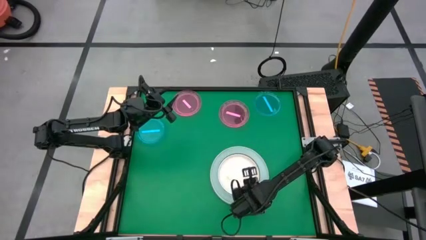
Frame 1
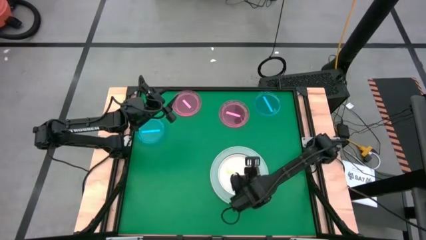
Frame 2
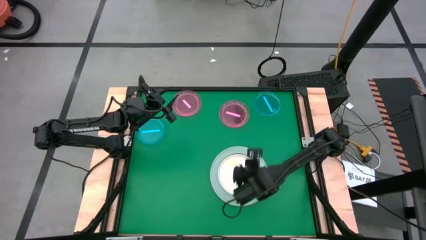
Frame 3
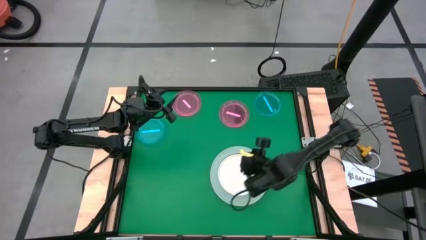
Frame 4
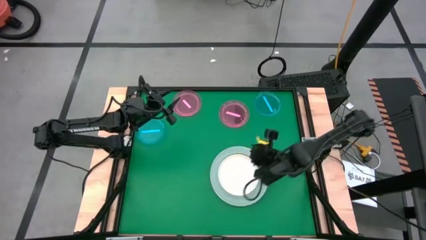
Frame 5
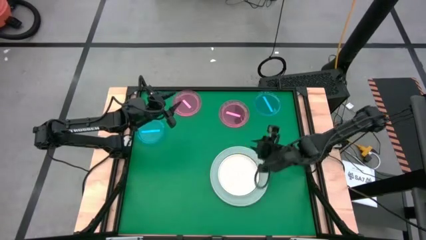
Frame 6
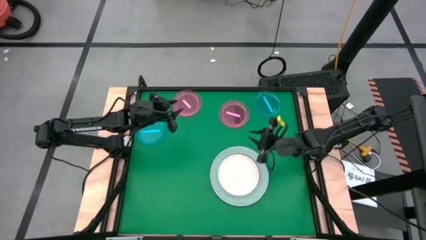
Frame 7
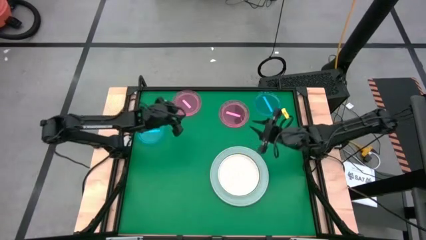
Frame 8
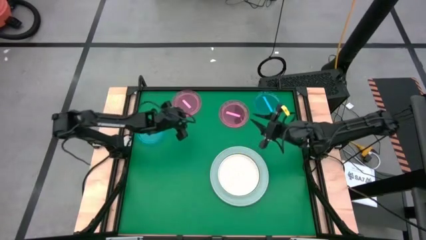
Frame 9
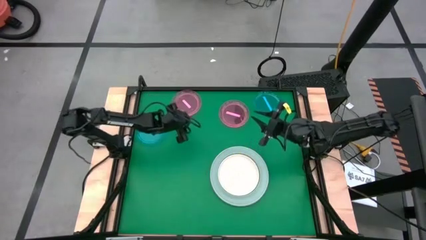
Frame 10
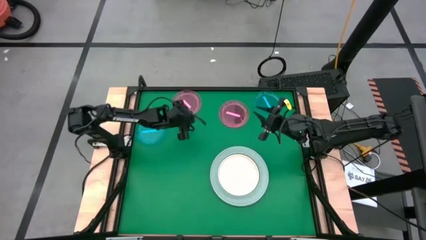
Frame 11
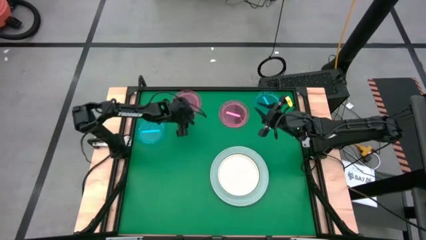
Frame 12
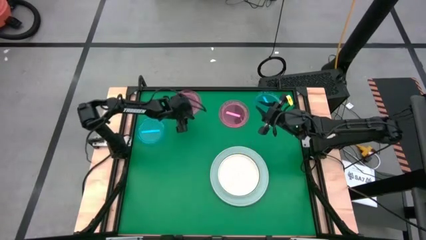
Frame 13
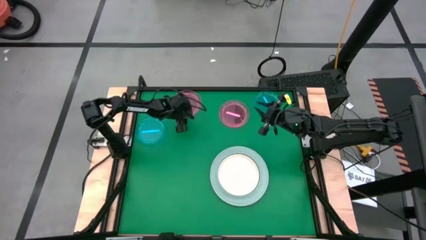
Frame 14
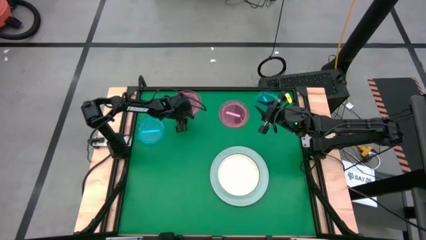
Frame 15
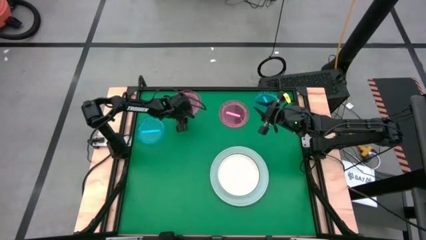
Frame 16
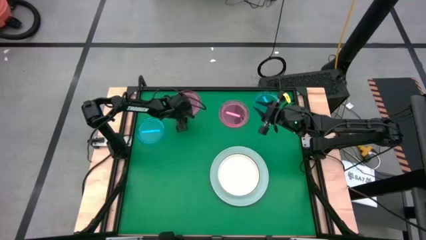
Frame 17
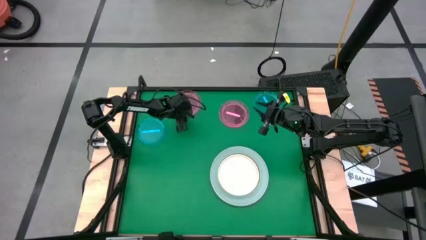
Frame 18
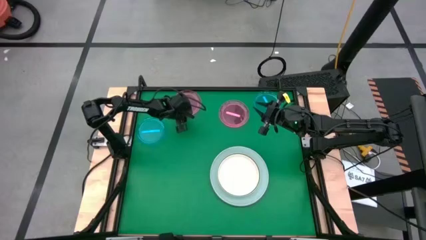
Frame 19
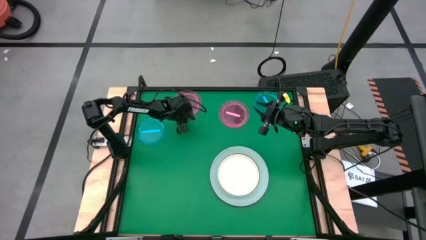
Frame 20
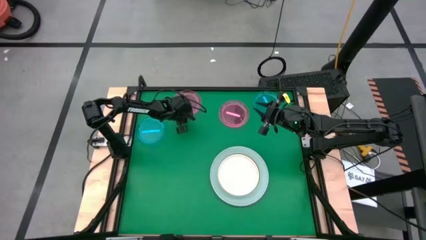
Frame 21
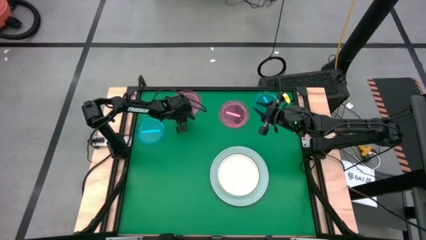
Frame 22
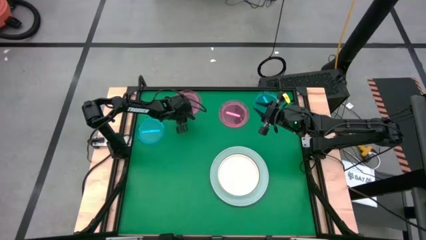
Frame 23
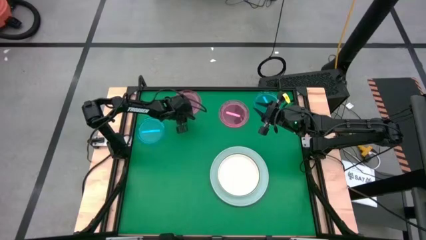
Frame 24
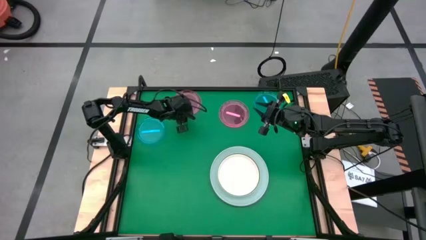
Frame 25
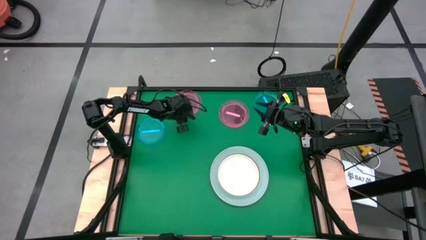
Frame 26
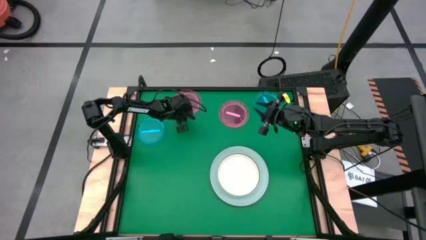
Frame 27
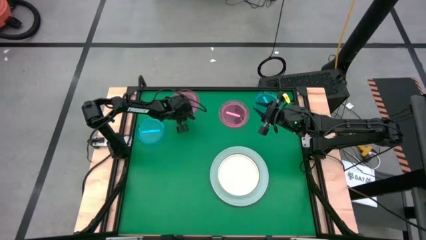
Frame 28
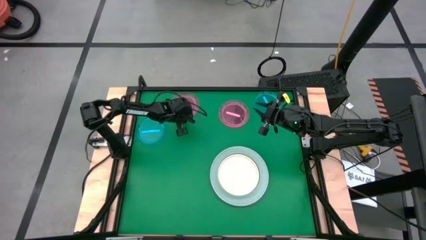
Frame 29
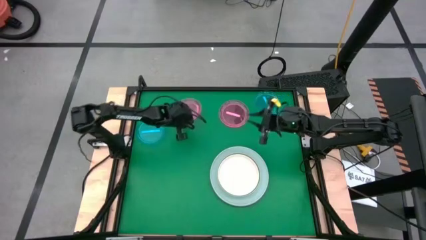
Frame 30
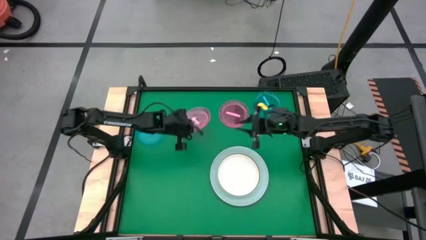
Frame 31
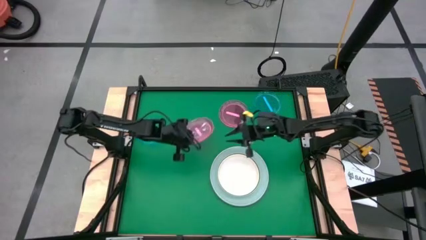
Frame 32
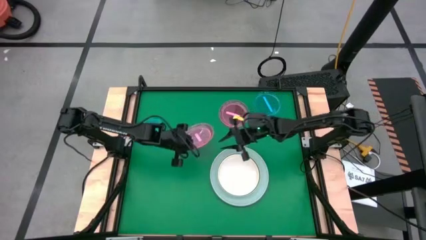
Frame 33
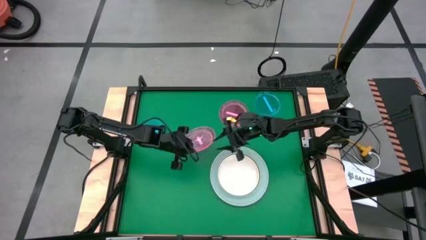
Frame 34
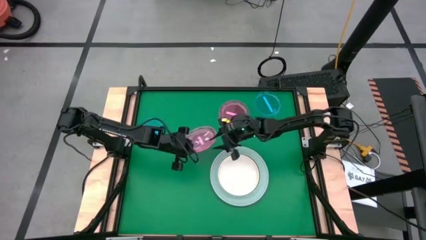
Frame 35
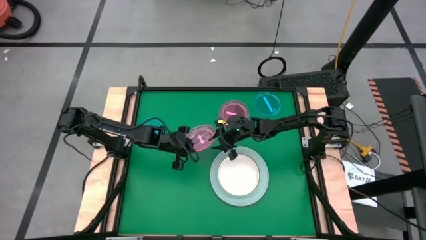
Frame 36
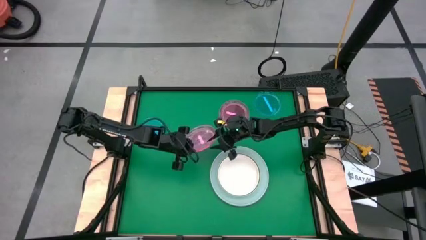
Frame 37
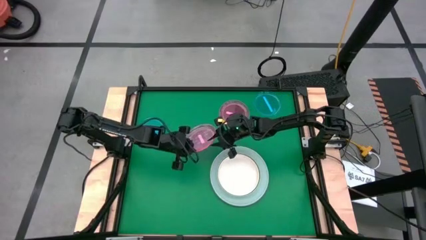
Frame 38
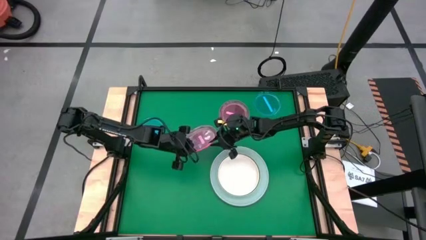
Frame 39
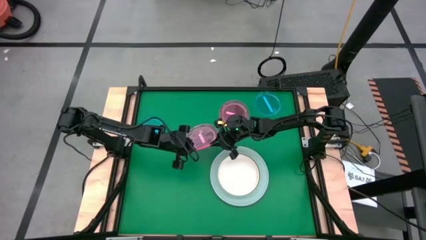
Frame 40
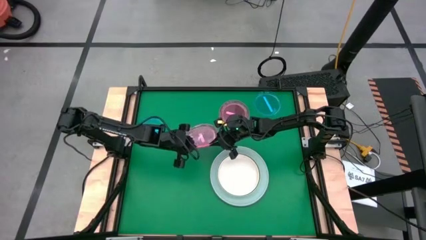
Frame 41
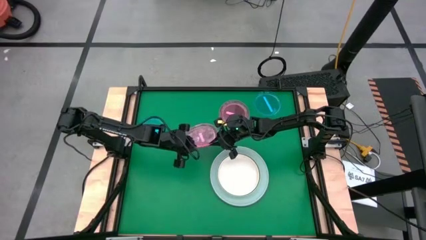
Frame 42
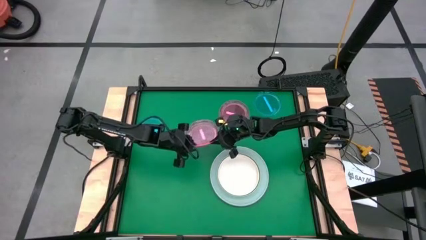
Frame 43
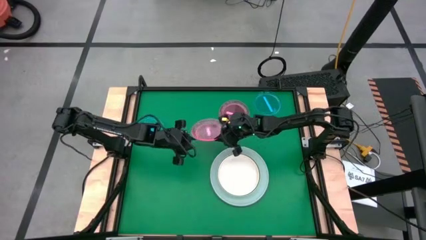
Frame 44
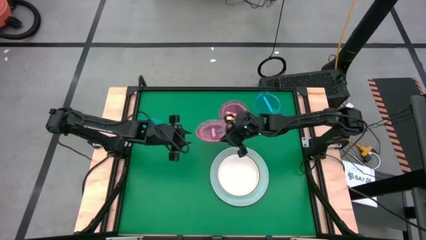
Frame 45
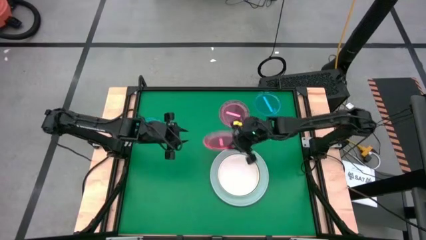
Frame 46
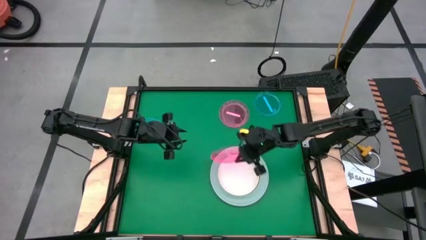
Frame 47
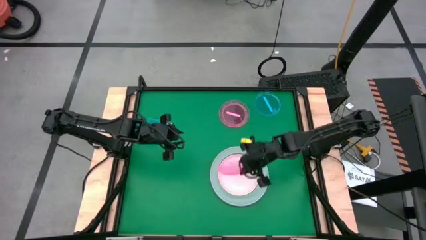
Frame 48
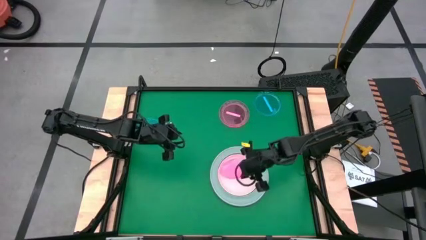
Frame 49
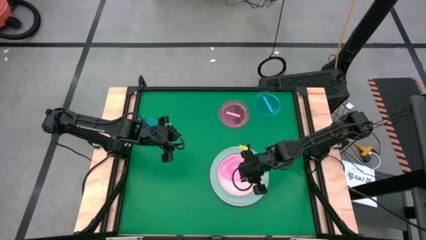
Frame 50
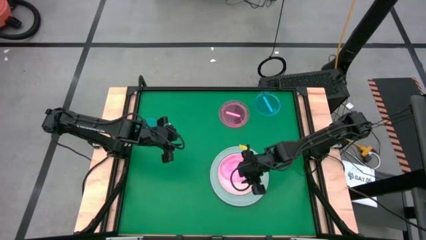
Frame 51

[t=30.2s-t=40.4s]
Task: Stack plastic plates
Stack the left pink plate on top of the white plate

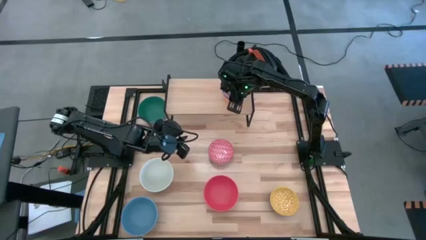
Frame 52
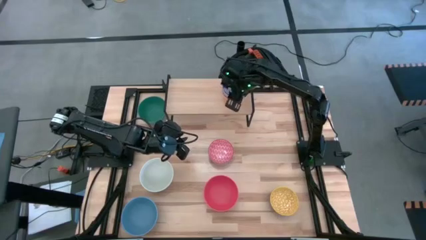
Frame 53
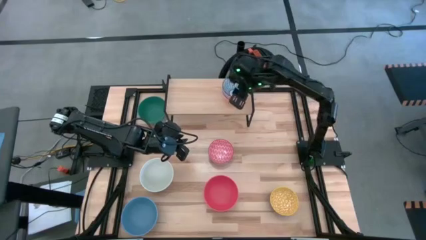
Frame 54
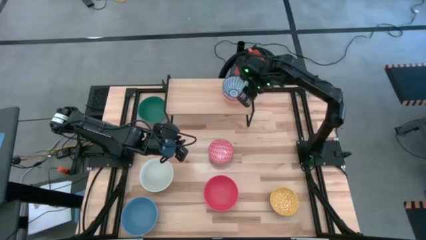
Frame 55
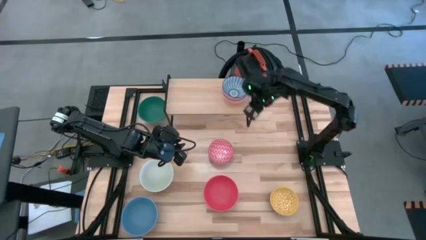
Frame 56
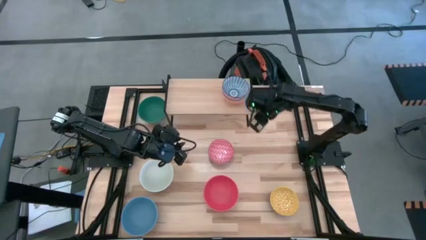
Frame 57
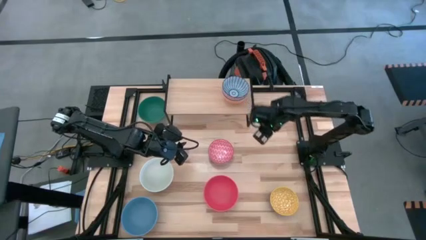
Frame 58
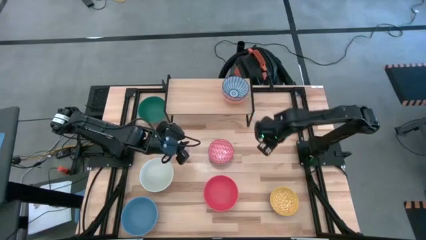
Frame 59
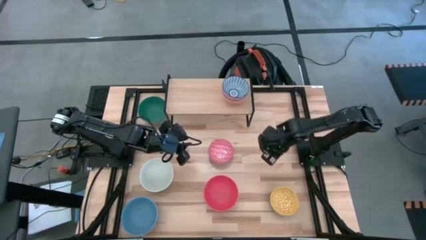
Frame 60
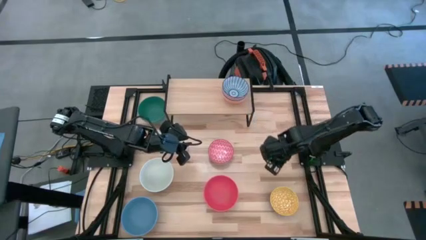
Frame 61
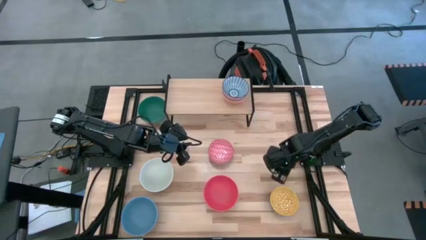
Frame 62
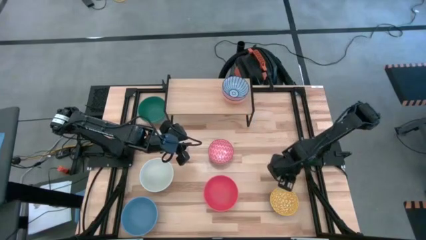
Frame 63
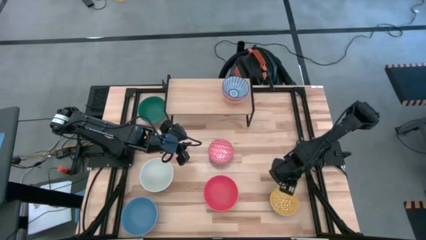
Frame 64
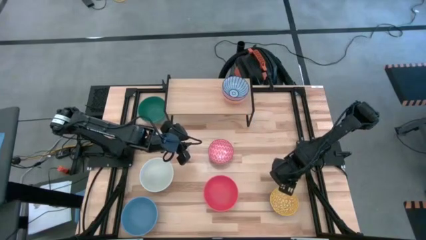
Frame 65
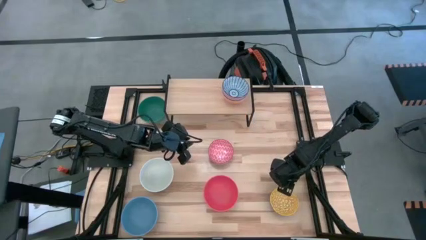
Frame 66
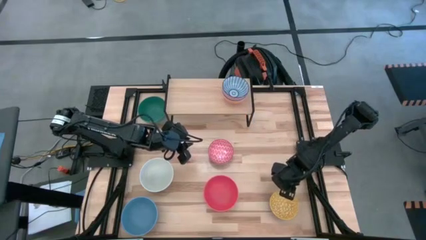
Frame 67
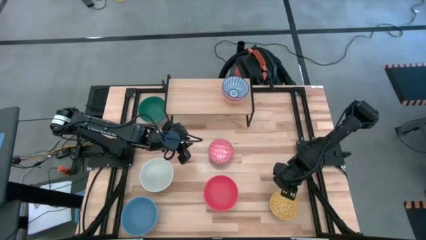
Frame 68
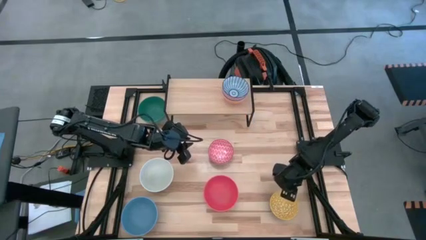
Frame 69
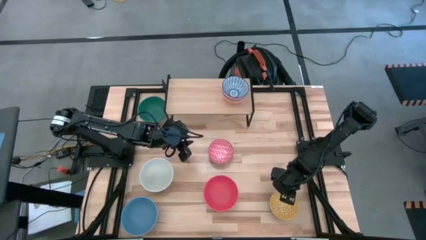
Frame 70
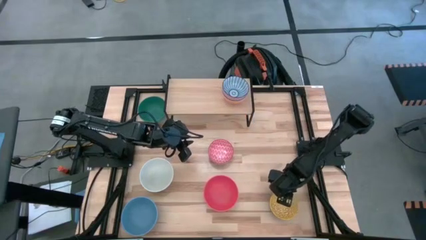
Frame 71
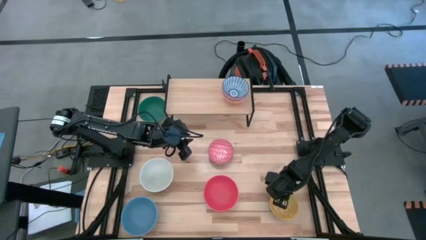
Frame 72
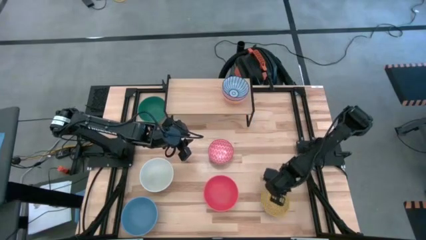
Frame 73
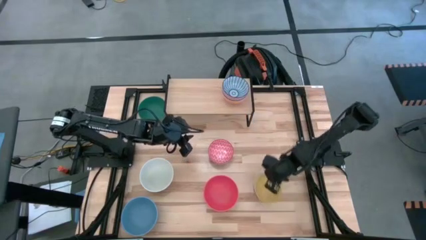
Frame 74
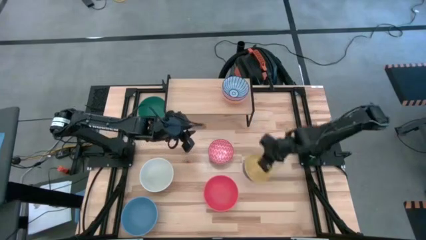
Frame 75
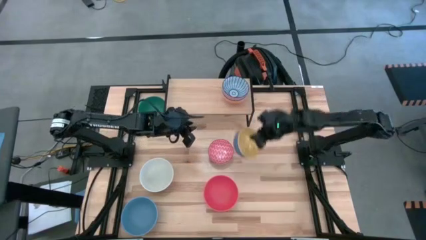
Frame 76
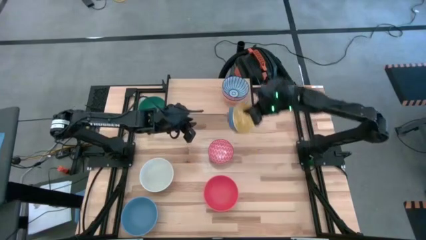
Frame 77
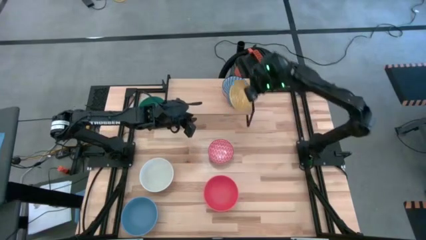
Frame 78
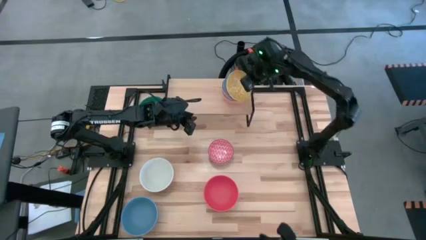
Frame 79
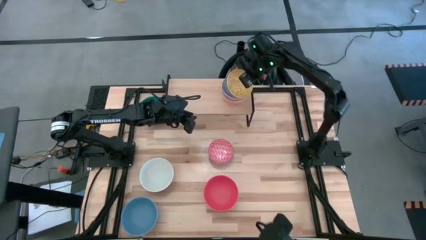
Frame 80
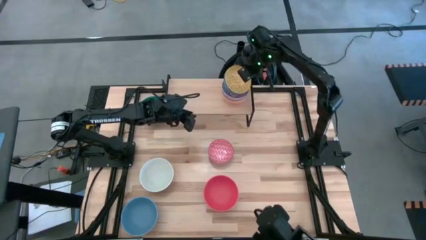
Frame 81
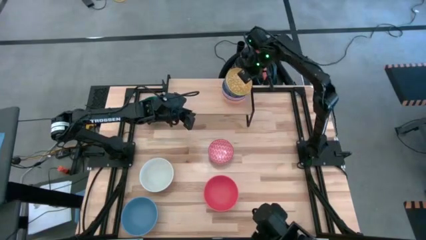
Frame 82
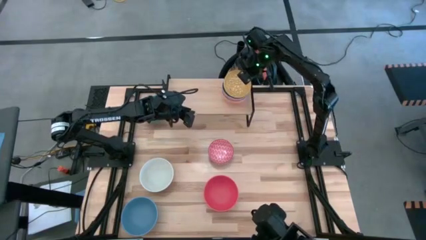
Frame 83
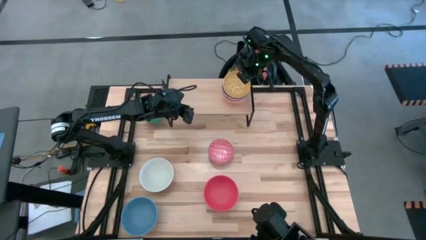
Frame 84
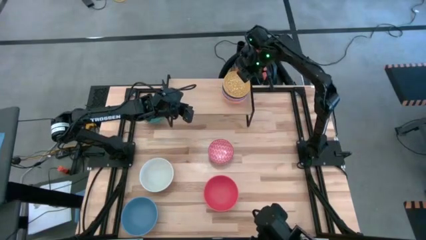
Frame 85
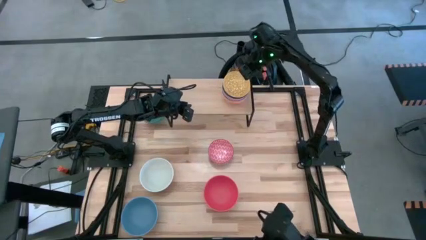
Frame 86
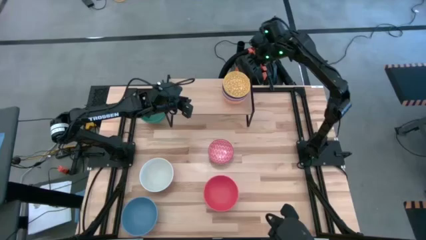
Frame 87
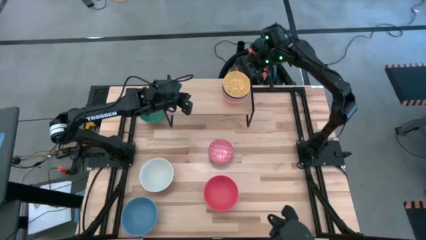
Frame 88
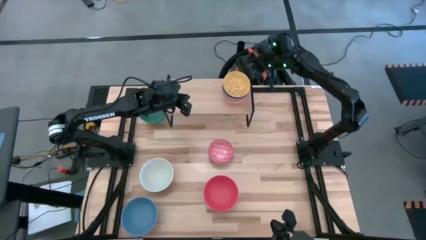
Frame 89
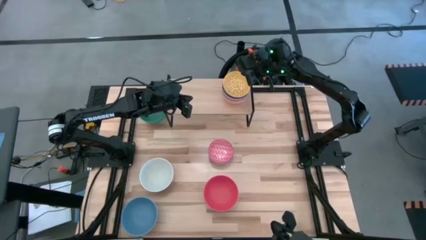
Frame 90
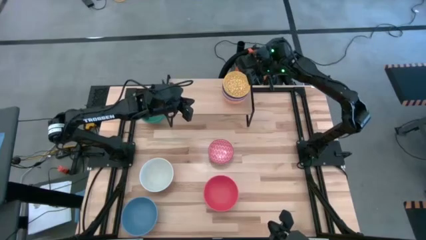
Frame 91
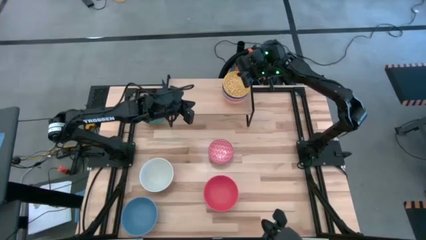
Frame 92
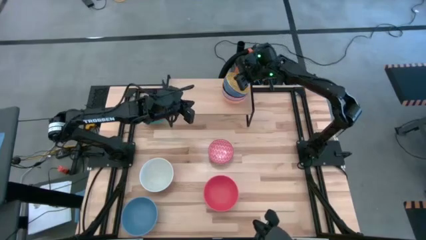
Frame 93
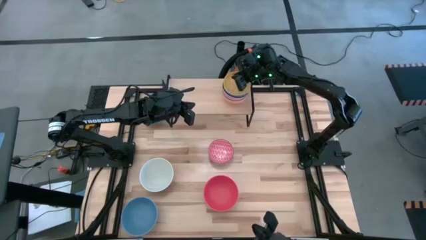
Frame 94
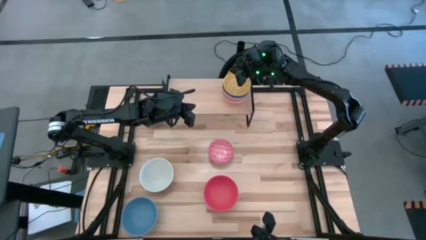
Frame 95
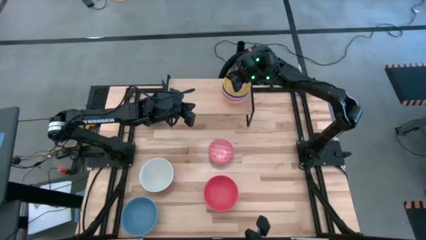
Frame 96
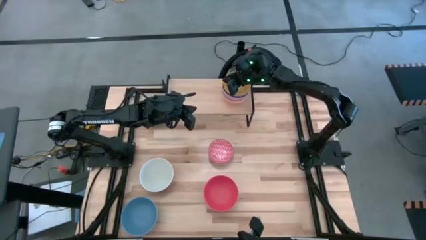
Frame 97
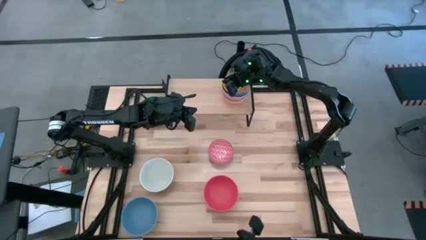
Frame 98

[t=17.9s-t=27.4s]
Task: Place and stack bowls onto a shelf
Stack the yellow patterned bowl on top of the dark blue patterned bowl on the shelf
